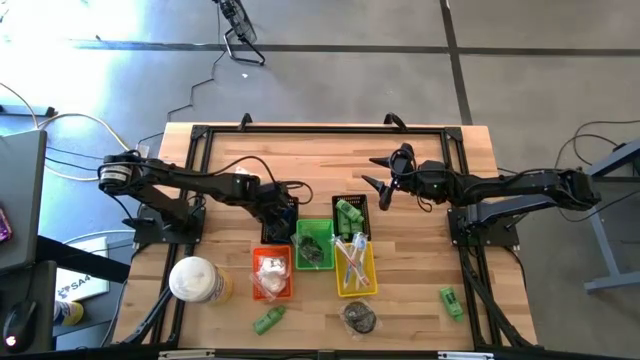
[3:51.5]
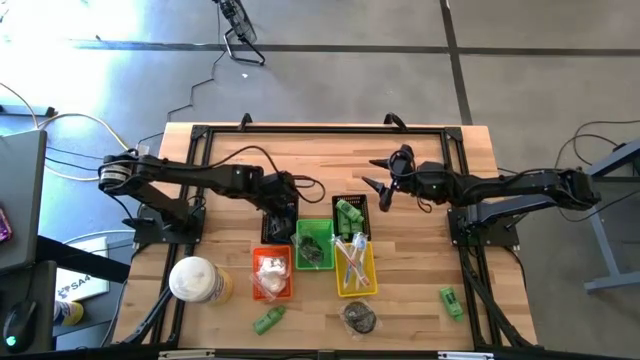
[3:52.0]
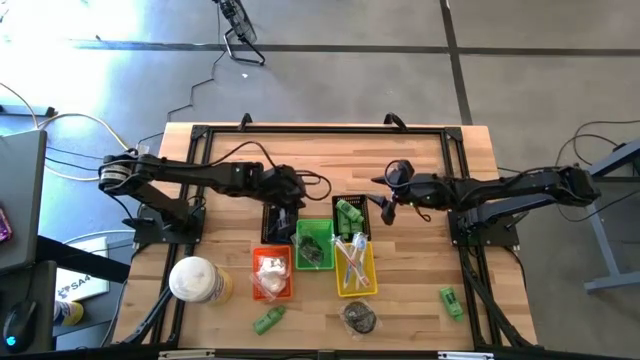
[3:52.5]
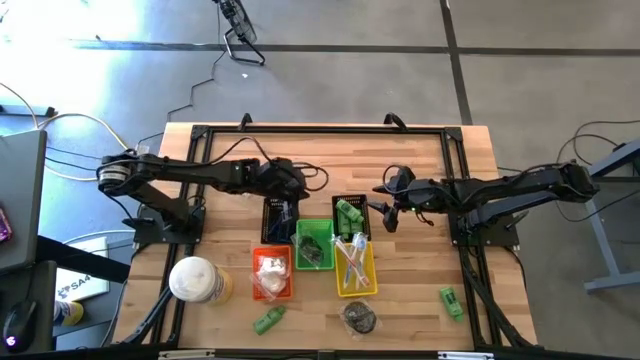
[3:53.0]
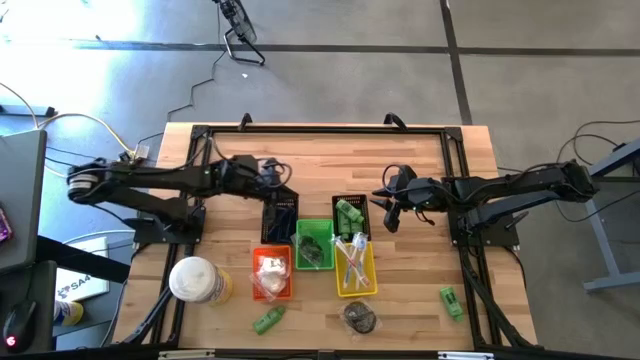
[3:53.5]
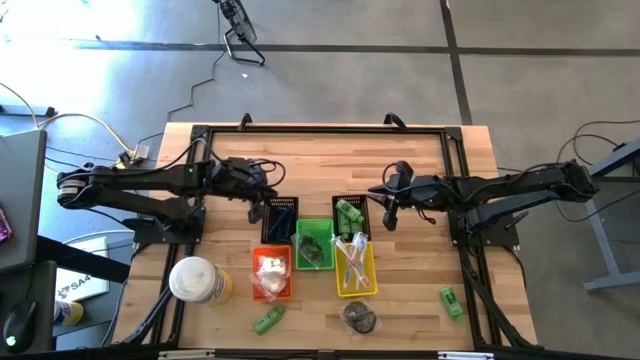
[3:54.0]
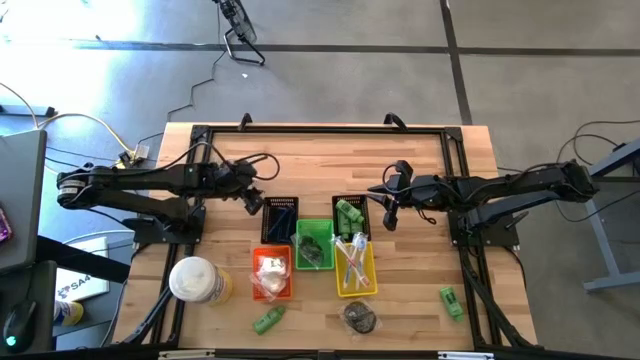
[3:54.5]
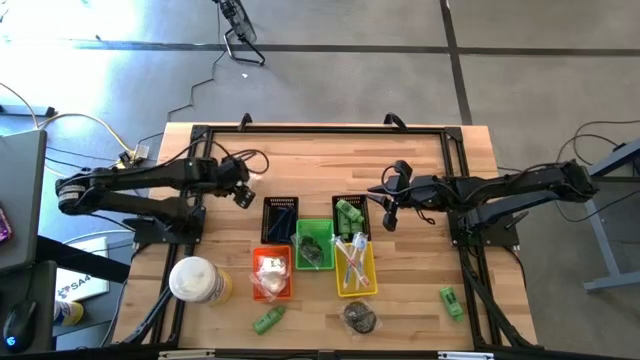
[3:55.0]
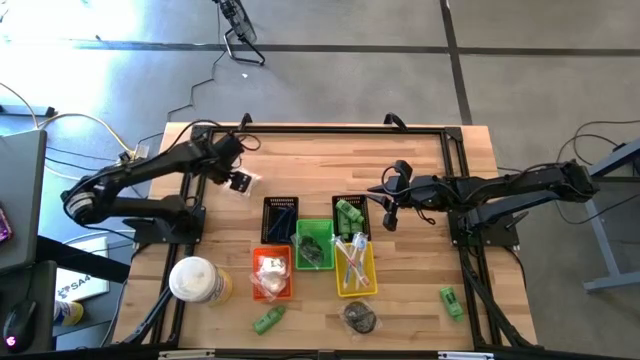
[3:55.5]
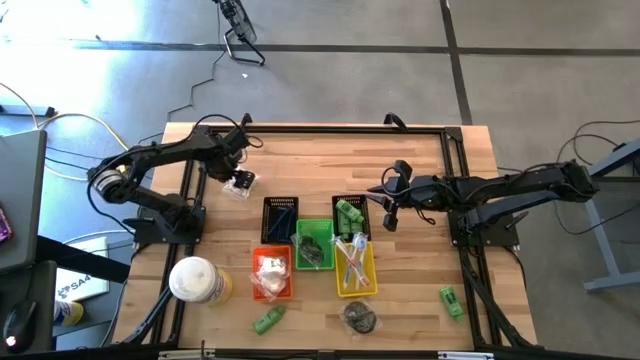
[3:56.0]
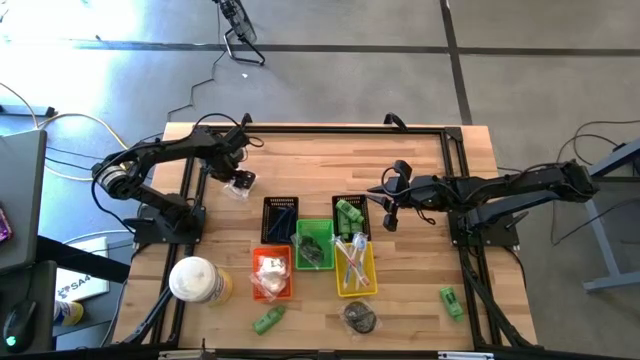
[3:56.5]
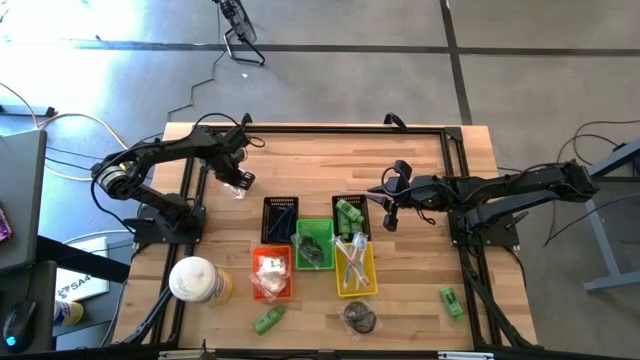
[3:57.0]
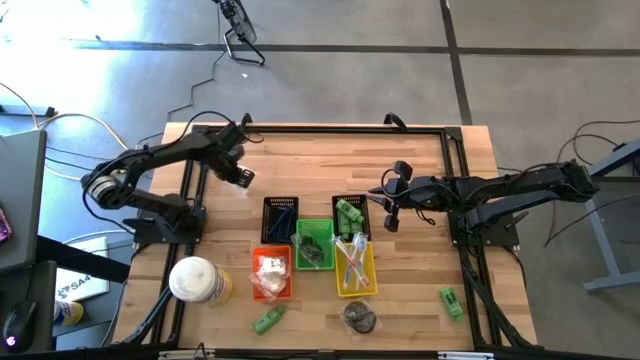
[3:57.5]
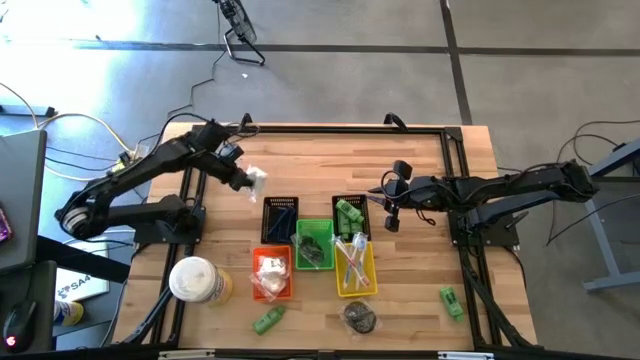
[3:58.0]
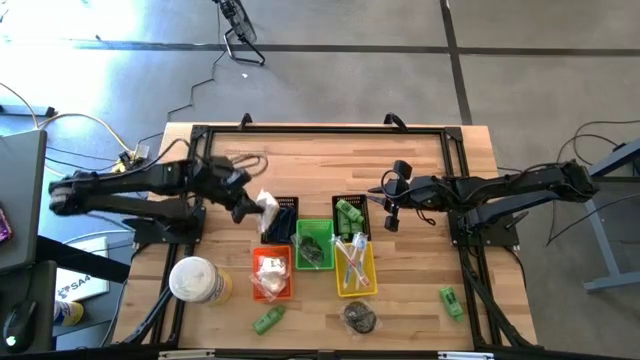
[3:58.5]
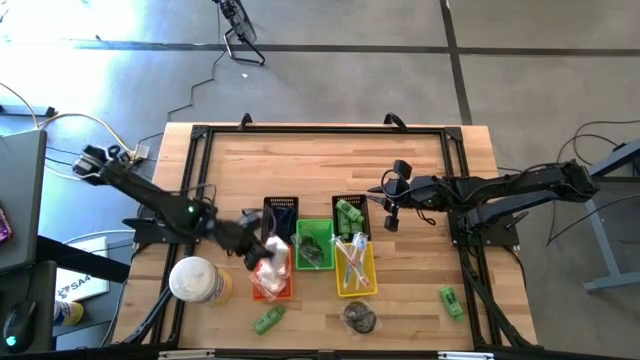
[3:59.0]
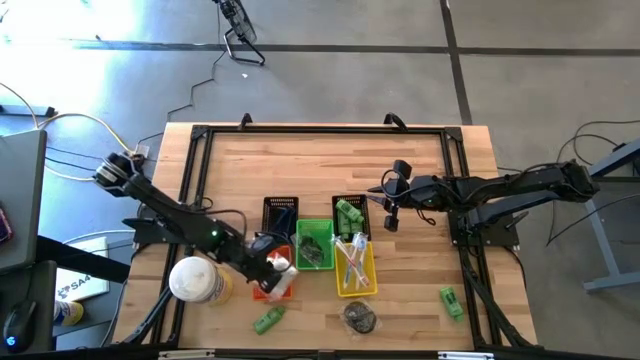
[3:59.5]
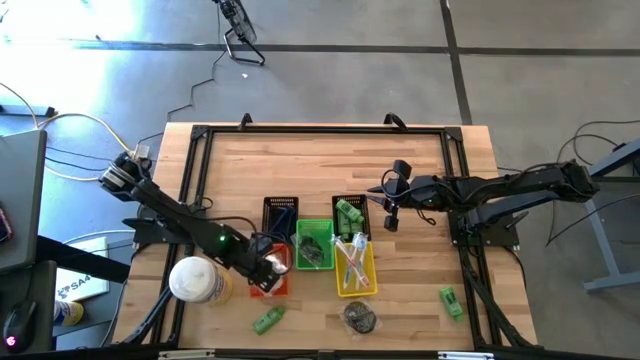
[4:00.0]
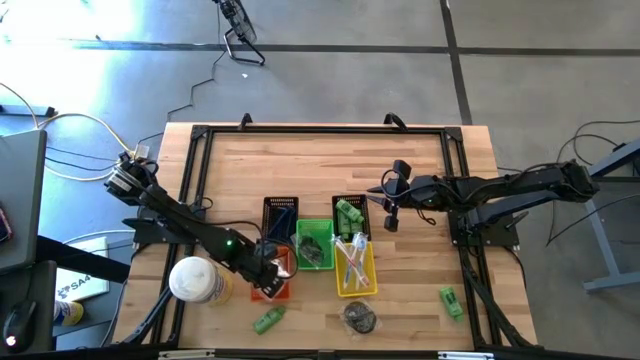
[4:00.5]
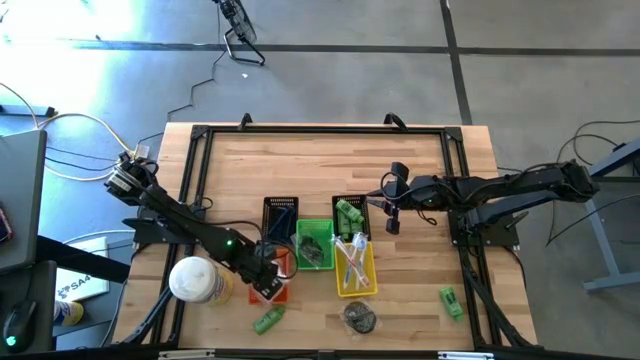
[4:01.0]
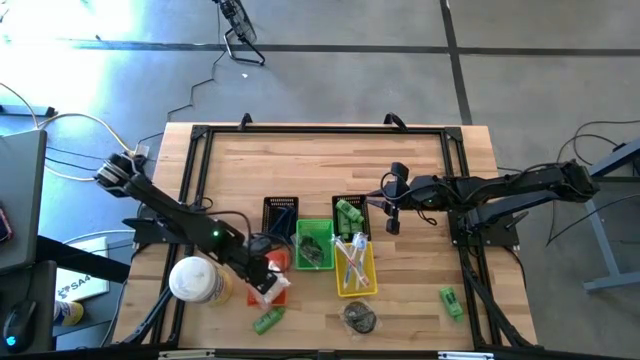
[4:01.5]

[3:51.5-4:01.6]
Task: Pick & Place Travel size toiletries
Put the white vanity pack into the orange bin

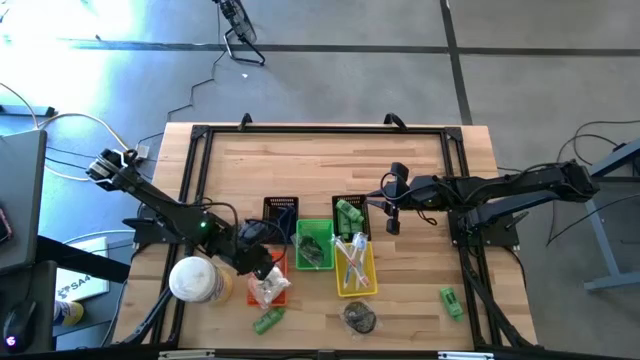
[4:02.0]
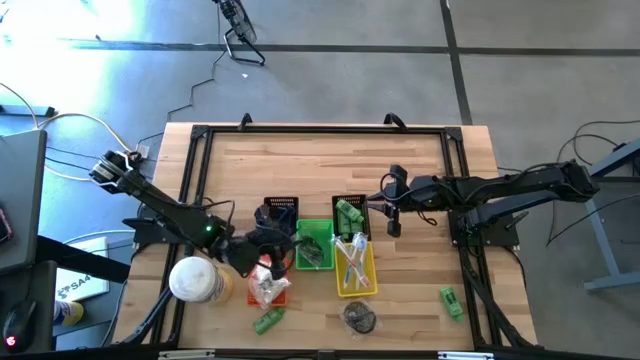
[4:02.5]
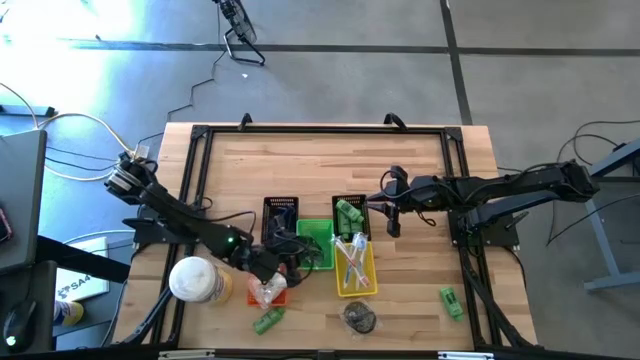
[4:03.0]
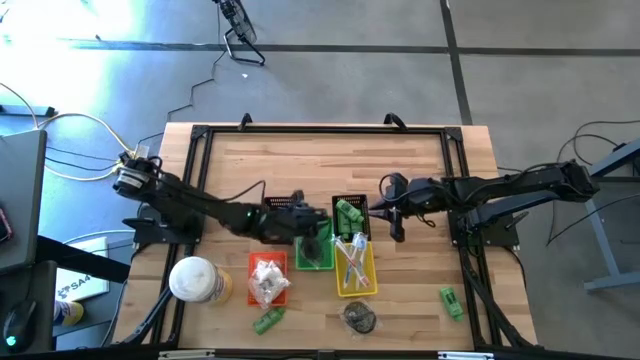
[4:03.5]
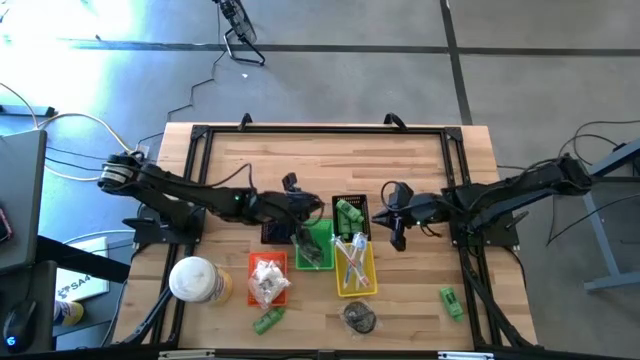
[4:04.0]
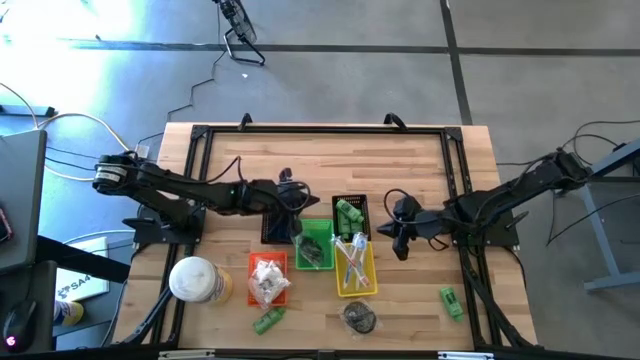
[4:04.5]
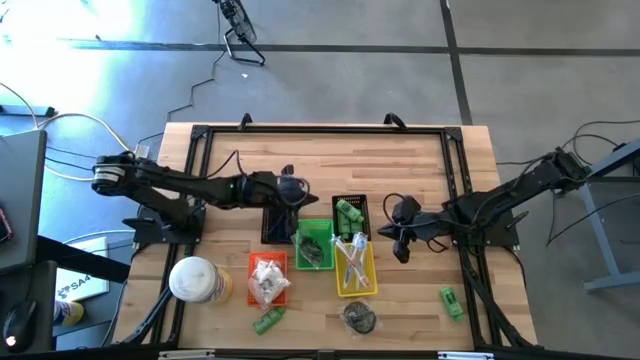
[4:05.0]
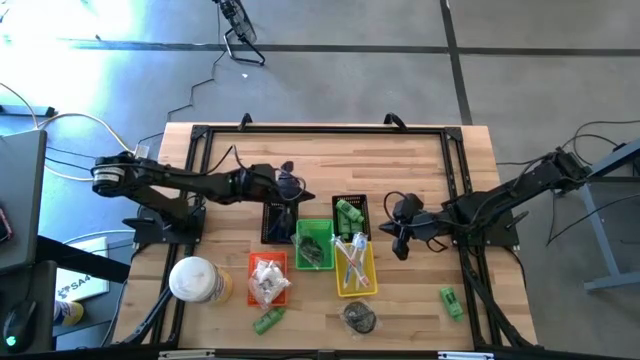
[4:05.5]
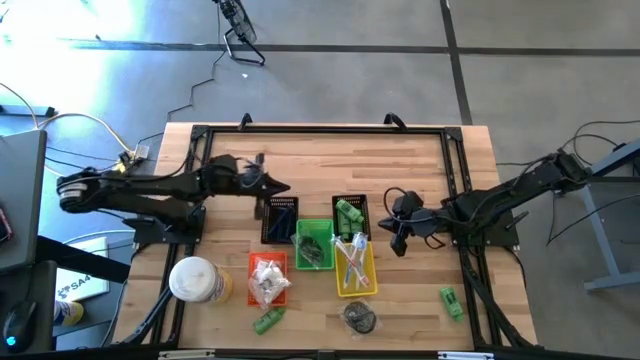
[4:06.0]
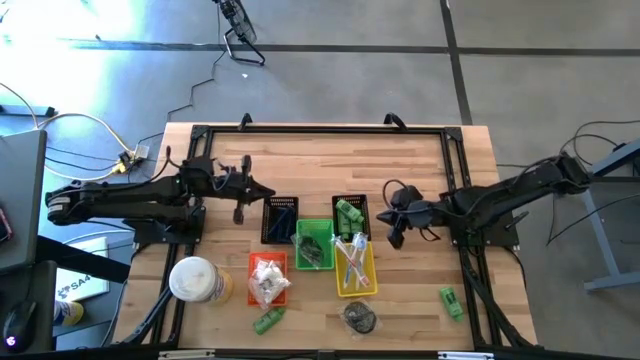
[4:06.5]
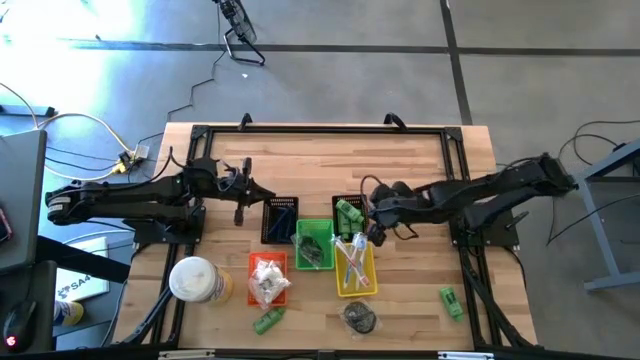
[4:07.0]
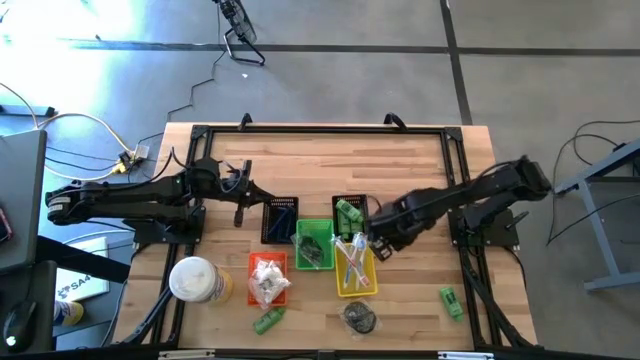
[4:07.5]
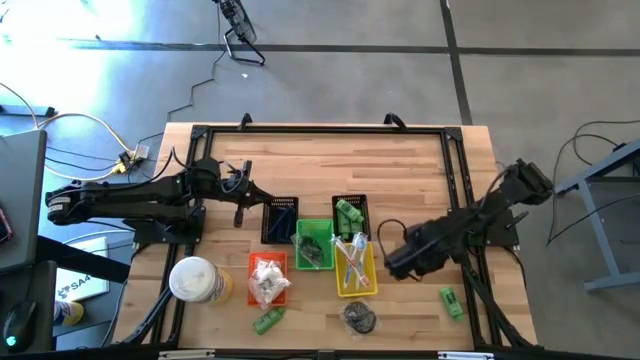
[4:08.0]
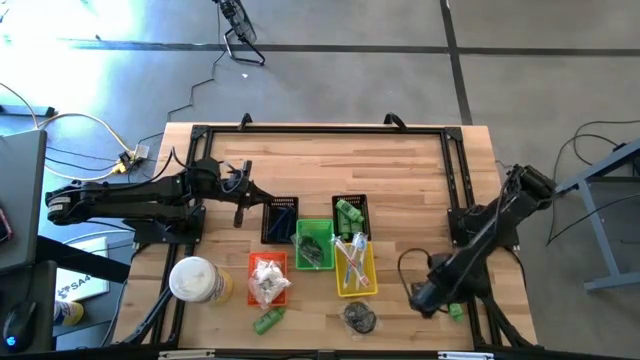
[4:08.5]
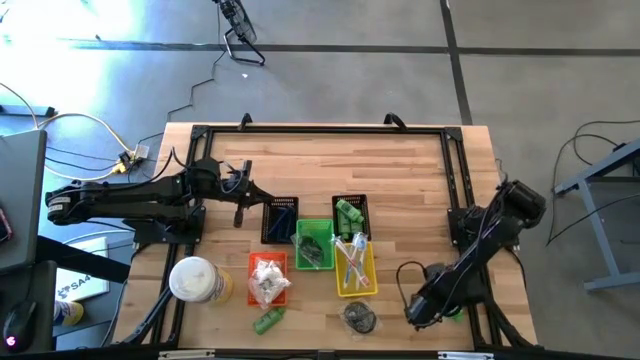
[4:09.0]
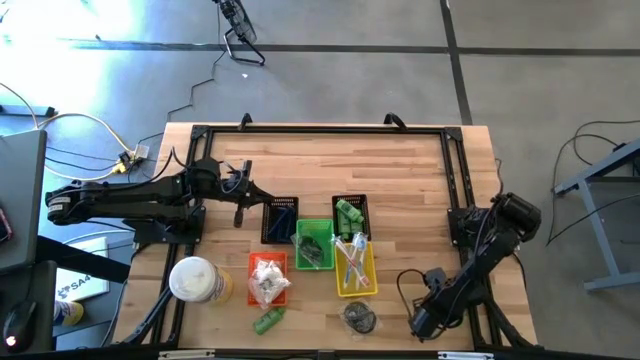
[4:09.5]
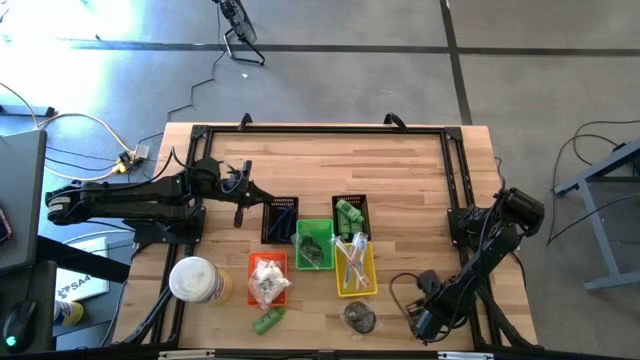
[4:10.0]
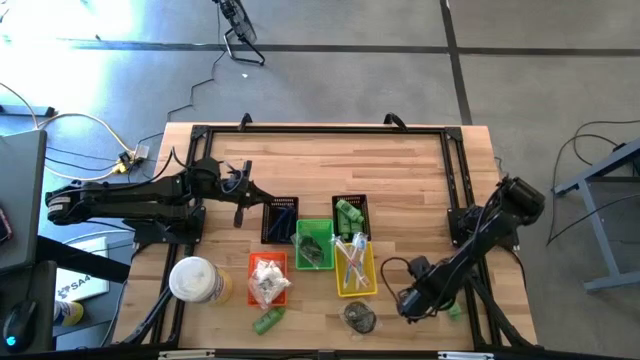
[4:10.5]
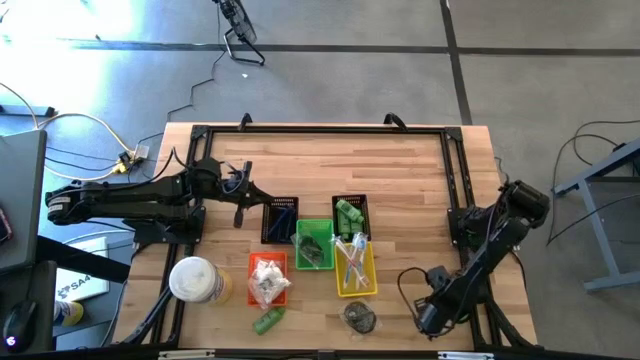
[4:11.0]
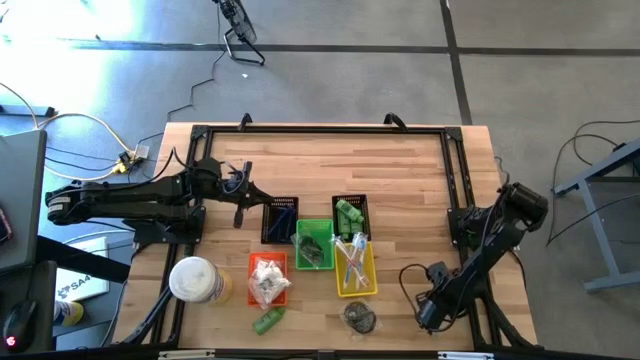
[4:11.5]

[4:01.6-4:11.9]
Put the green shampoo into the right black bin
